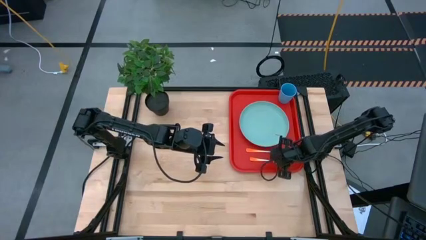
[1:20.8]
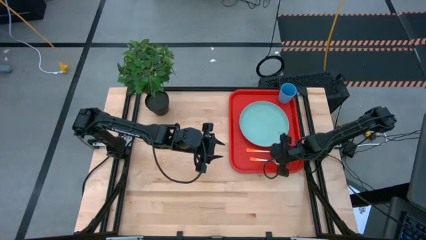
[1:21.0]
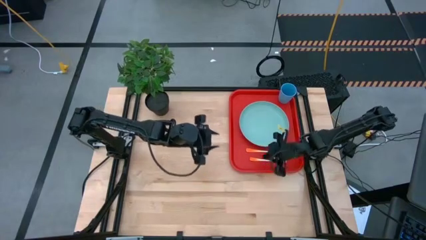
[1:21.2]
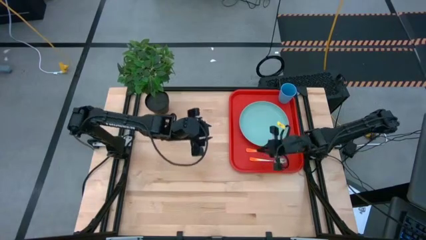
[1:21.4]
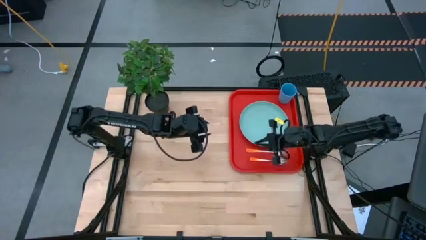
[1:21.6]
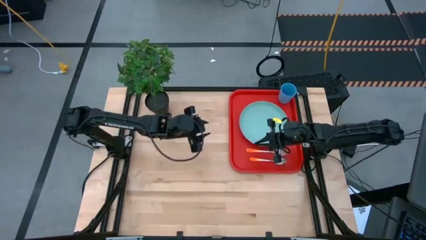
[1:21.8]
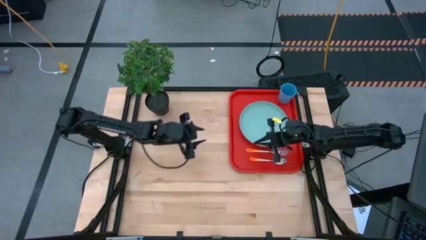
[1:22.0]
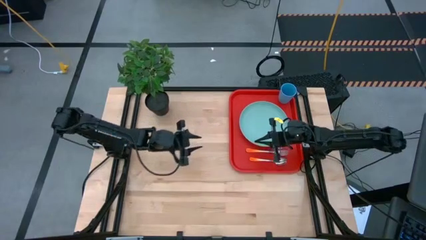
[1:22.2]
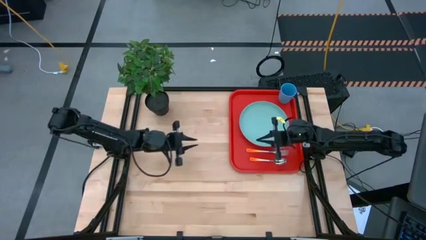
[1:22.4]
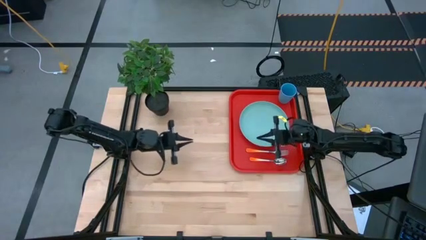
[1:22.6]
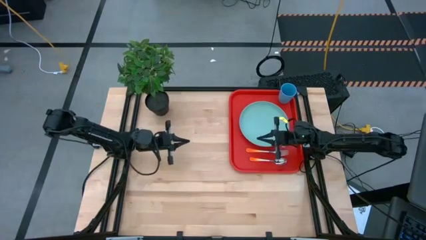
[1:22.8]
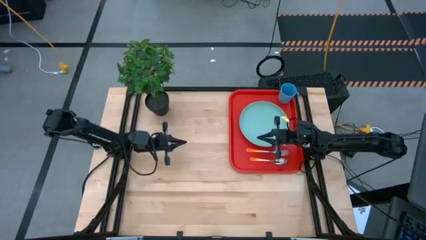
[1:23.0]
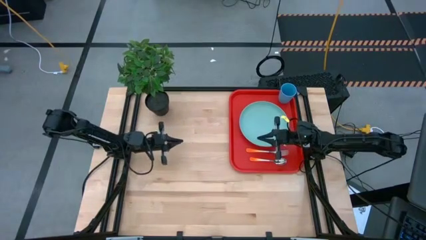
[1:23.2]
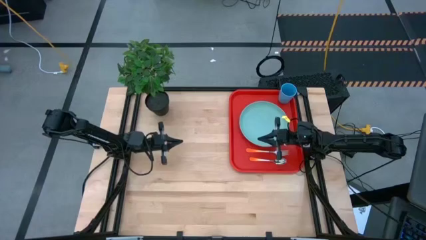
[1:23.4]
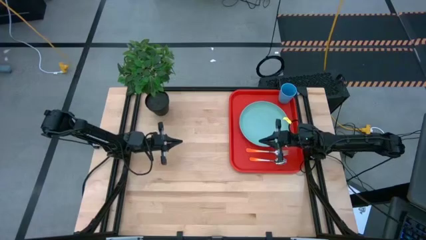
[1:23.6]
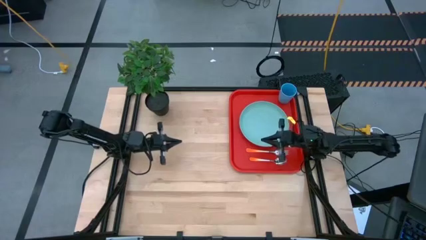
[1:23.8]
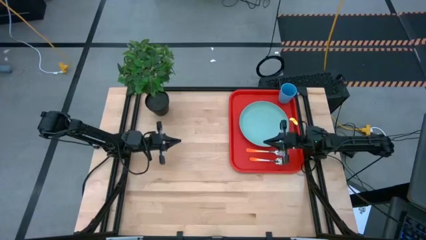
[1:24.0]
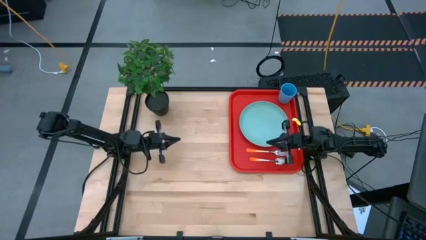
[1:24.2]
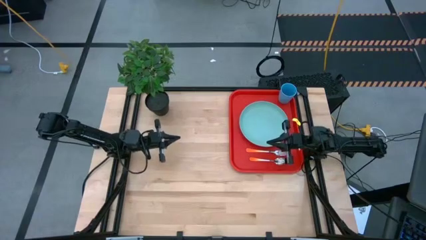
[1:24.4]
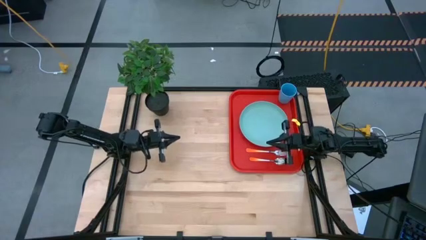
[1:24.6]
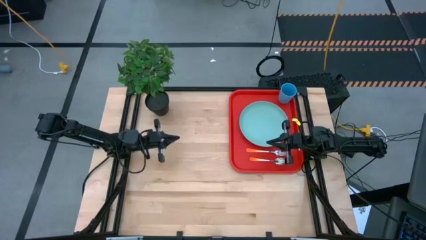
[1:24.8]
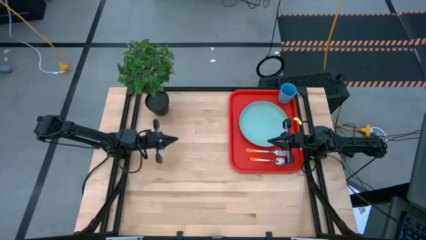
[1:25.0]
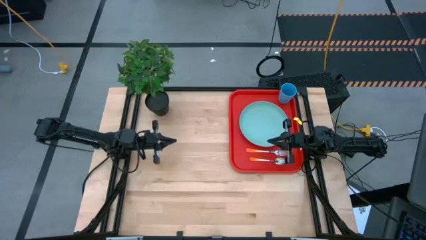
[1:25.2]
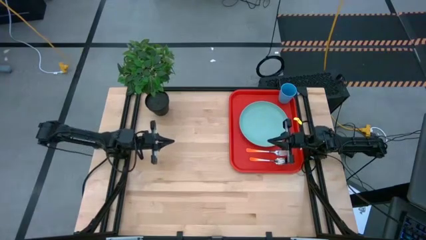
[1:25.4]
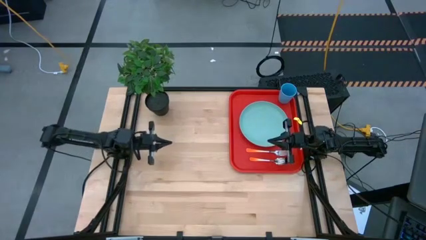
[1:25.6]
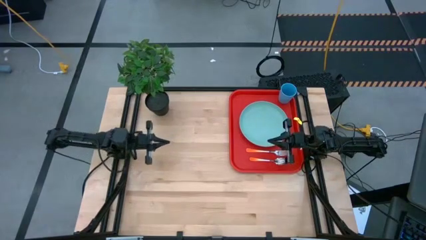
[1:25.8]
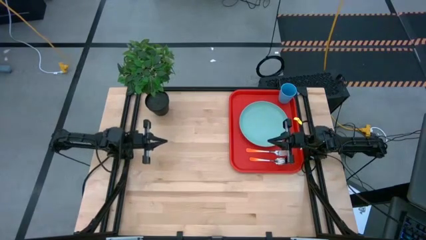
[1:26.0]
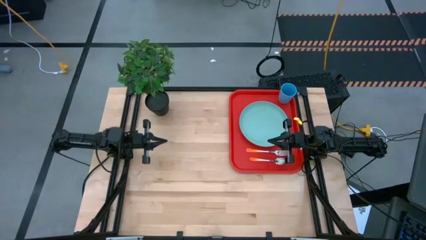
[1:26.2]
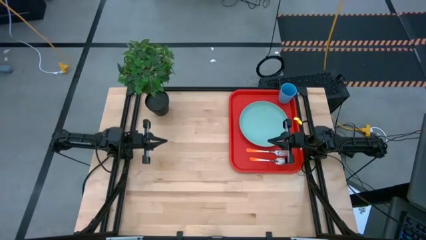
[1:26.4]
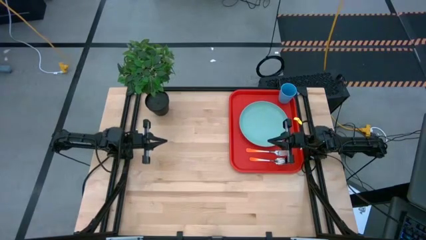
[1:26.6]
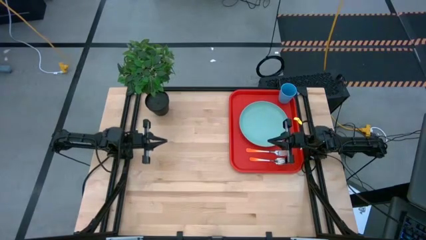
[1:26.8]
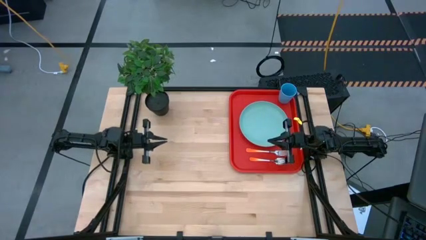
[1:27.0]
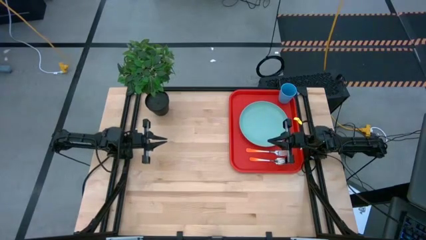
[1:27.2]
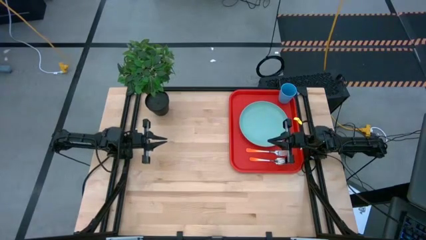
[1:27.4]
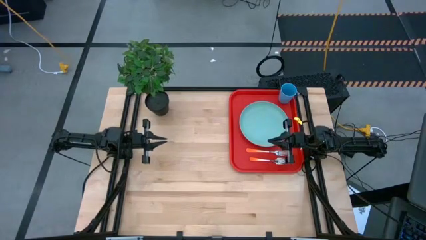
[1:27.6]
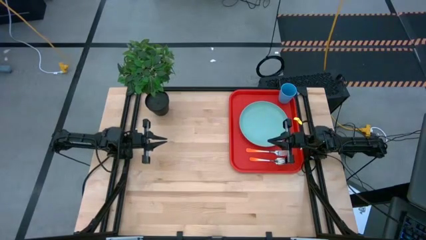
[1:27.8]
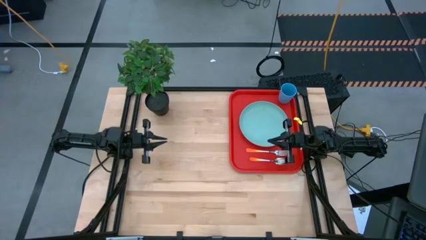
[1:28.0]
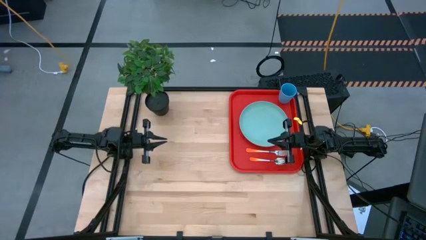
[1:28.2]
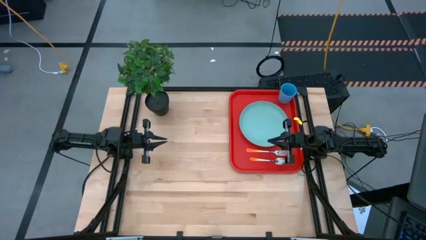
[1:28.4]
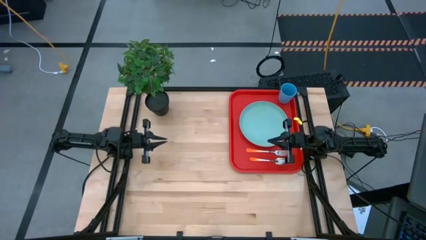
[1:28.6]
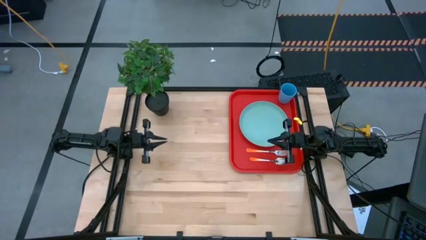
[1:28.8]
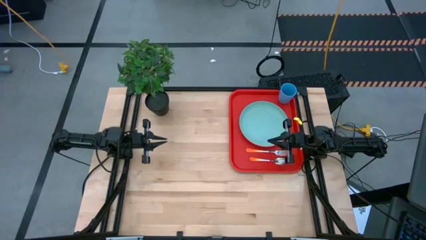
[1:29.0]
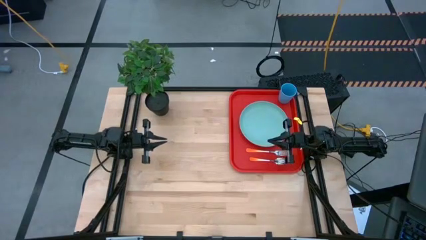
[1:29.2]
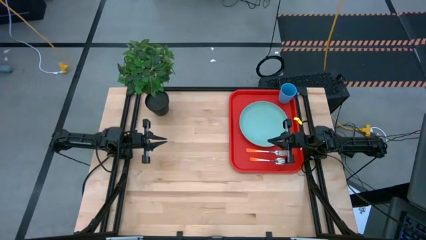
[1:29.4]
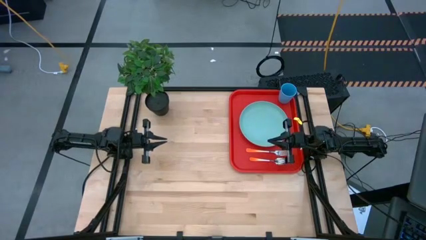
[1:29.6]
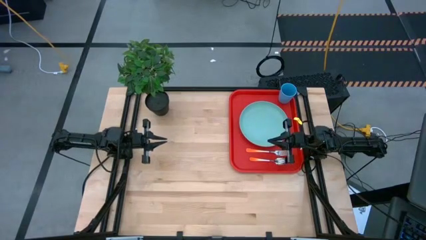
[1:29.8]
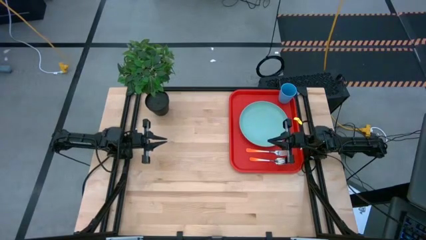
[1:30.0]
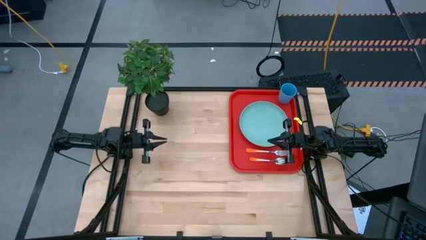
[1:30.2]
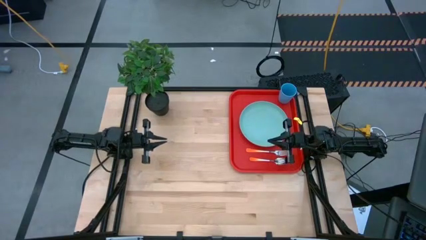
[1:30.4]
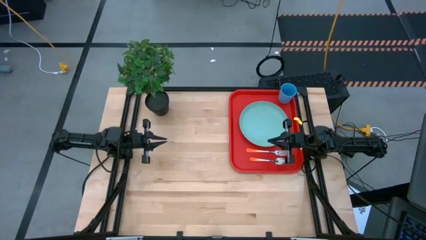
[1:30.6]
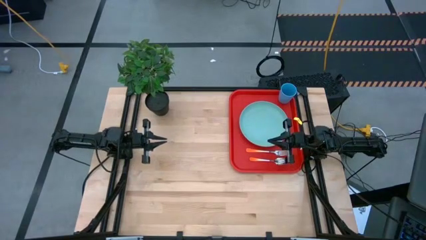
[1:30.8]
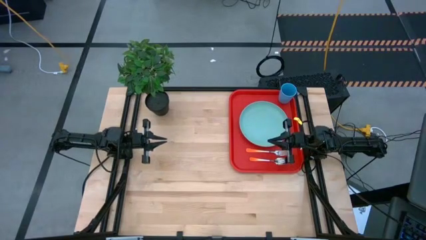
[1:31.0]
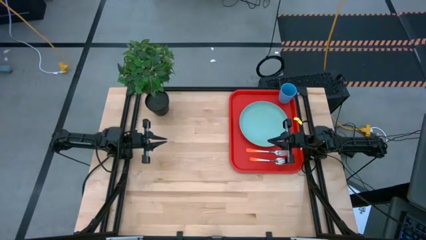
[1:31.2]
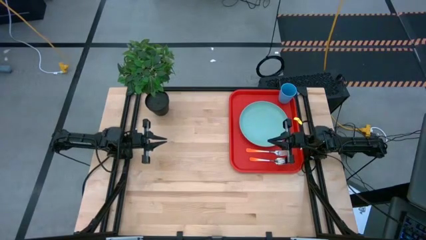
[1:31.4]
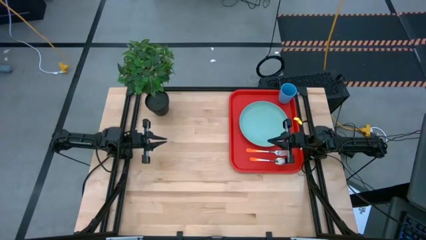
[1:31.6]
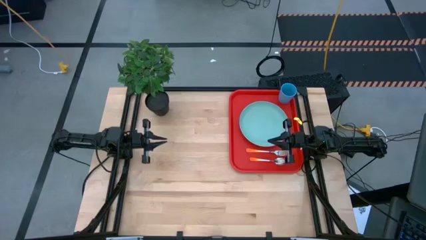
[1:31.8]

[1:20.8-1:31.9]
Task: Pick and place plate/cup/fork/spoon on tray
Return to Home Position
